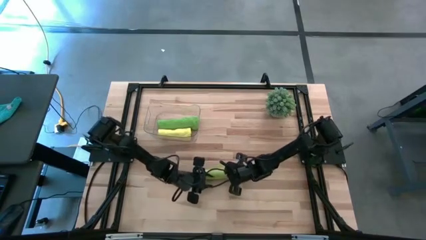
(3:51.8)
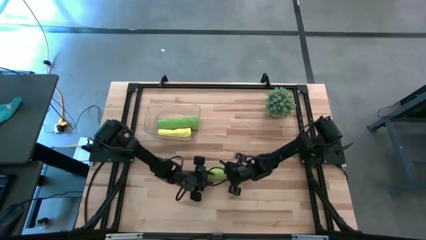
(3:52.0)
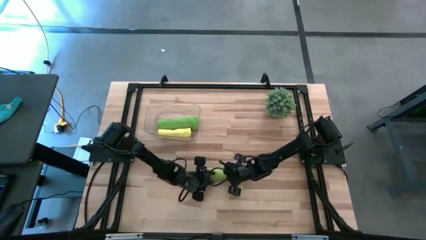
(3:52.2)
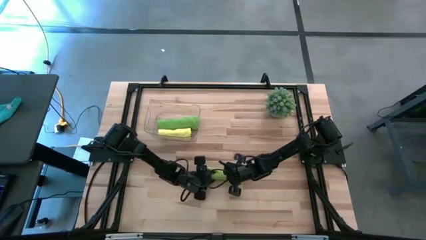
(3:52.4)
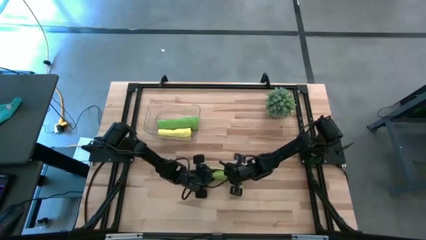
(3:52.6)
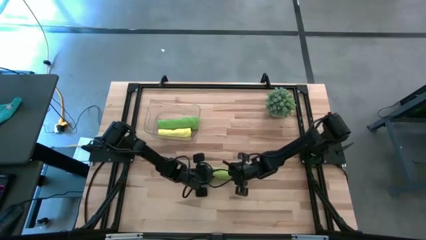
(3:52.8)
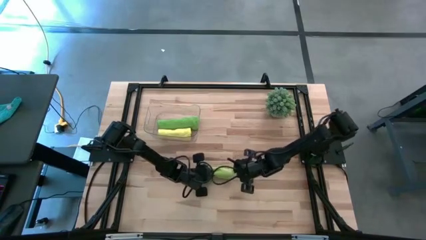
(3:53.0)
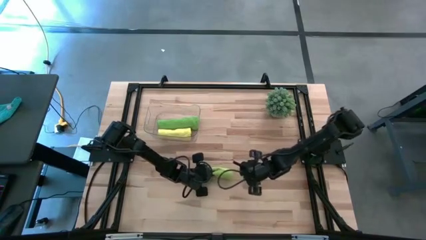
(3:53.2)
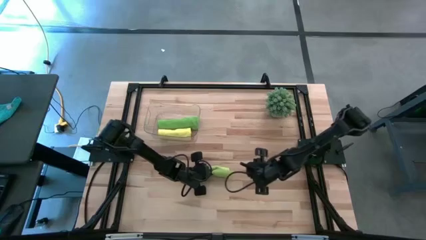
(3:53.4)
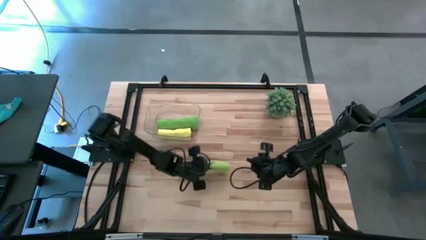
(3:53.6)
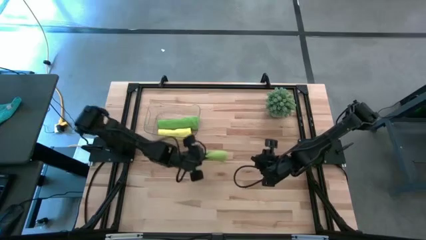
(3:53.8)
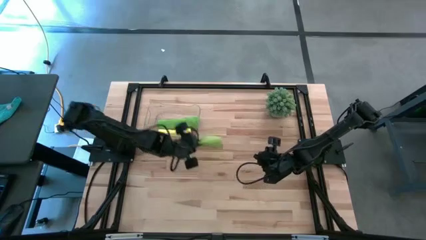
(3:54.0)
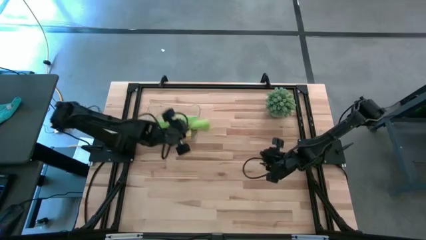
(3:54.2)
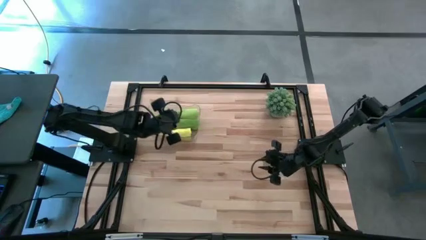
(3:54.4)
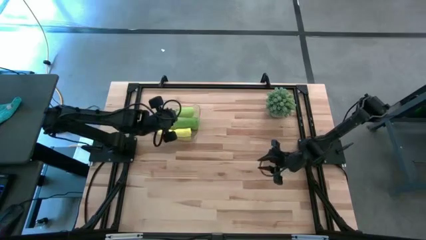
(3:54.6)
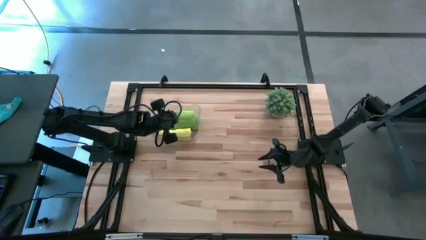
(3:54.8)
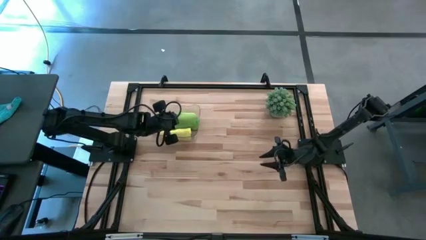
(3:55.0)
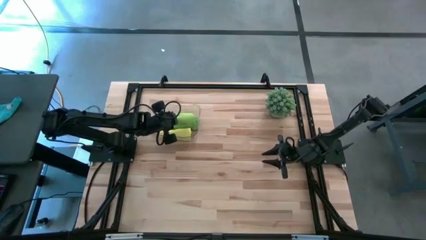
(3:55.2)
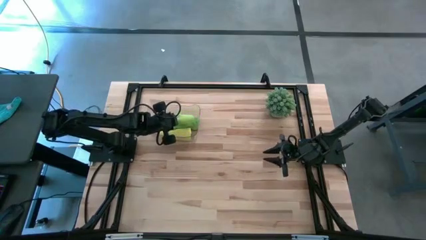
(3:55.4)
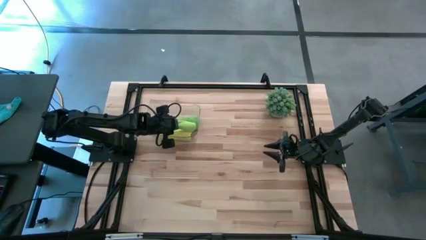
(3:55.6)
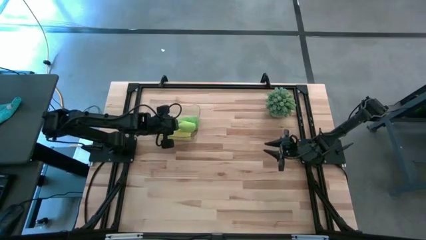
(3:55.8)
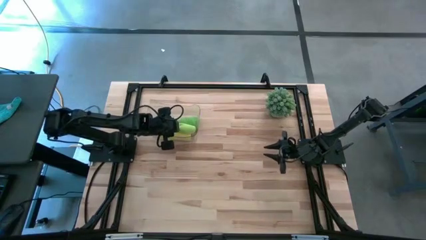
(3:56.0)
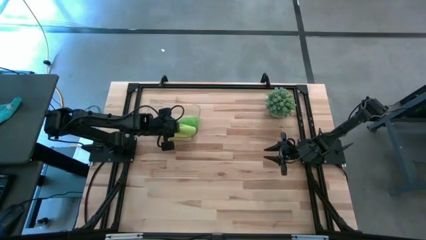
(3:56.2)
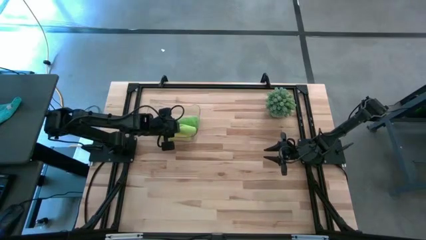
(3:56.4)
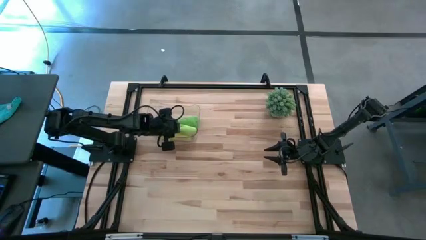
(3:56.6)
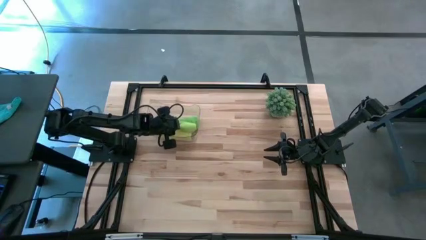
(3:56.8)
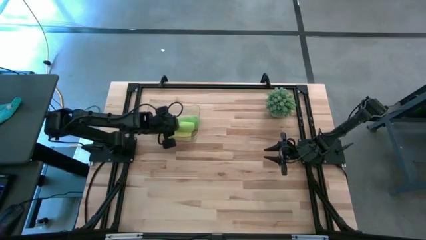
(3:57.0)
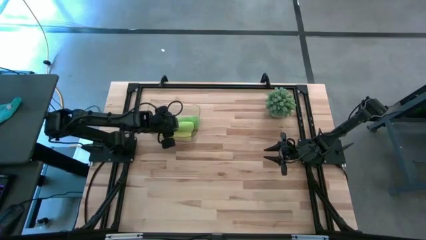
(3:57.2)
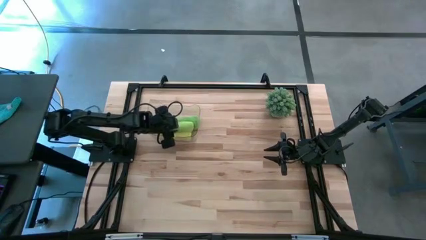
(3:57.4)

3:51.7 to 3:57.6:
Task: Roll microfiber towels into tight, uniform cylinder then place into a basket
Put the green towel into the transparent bin

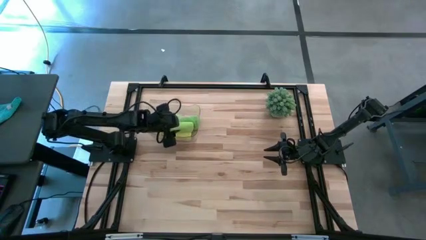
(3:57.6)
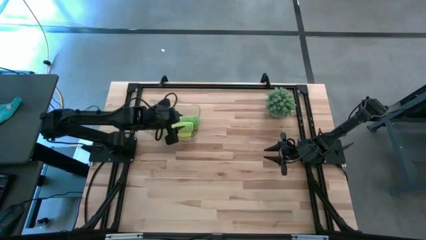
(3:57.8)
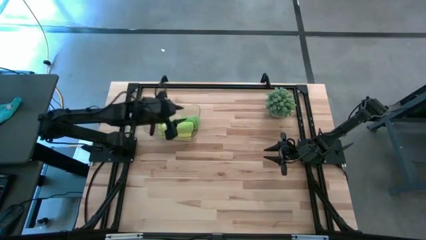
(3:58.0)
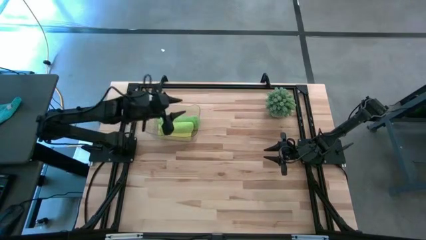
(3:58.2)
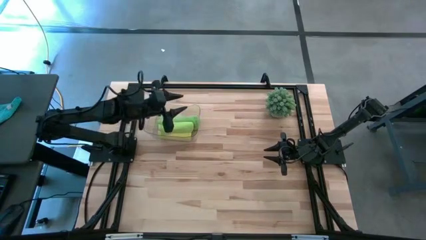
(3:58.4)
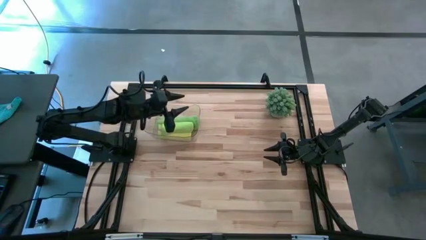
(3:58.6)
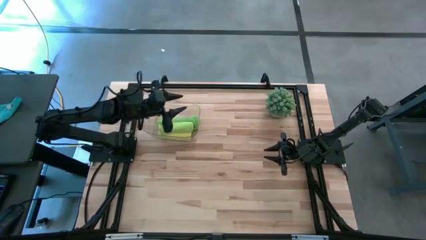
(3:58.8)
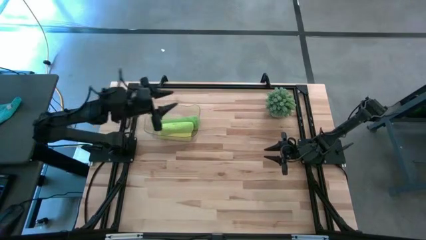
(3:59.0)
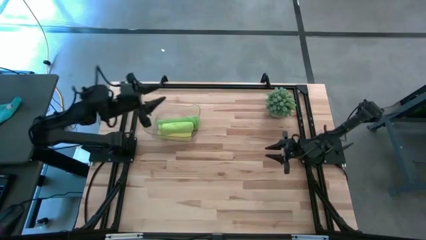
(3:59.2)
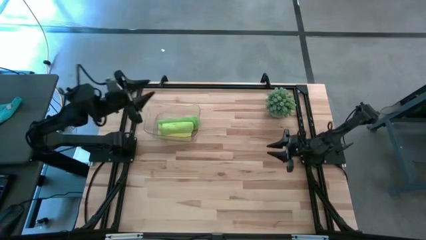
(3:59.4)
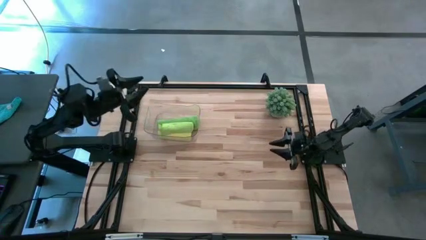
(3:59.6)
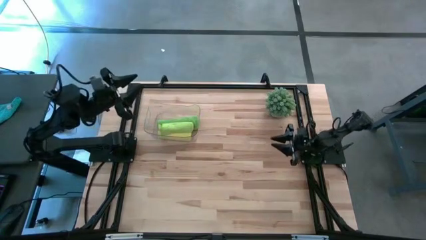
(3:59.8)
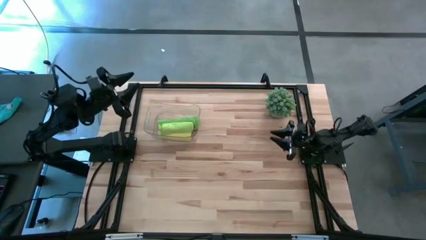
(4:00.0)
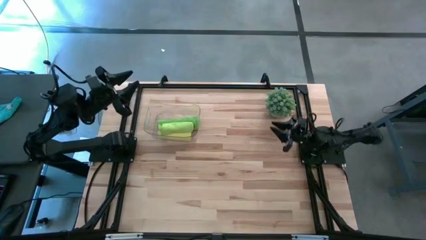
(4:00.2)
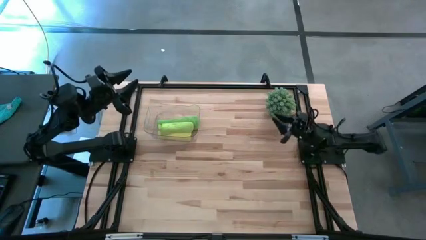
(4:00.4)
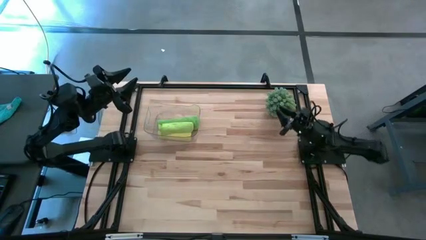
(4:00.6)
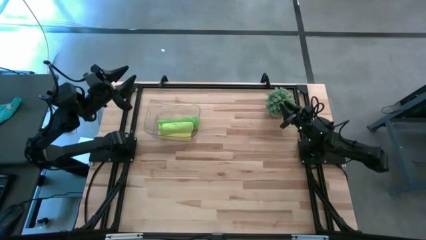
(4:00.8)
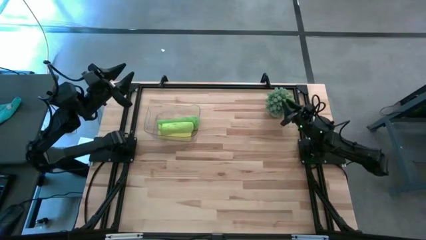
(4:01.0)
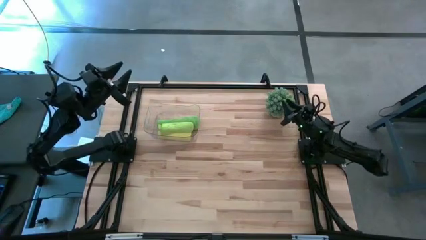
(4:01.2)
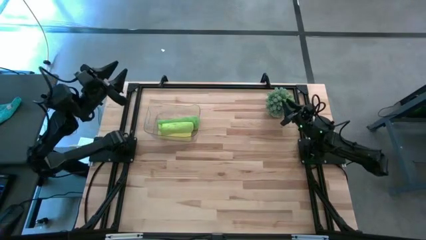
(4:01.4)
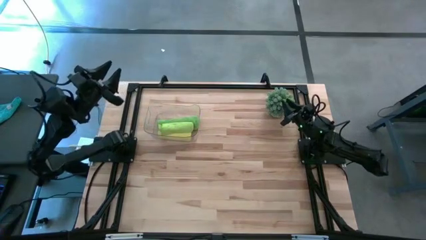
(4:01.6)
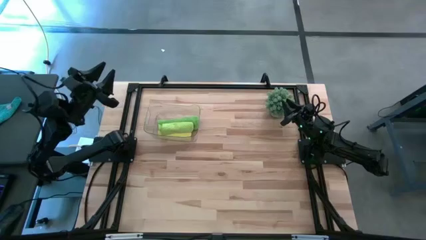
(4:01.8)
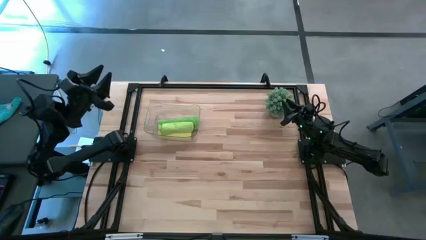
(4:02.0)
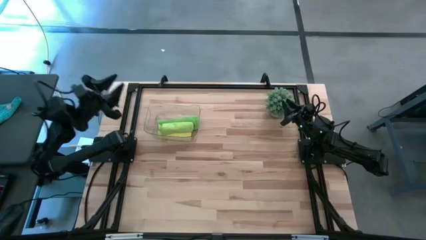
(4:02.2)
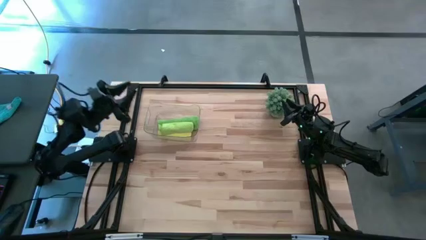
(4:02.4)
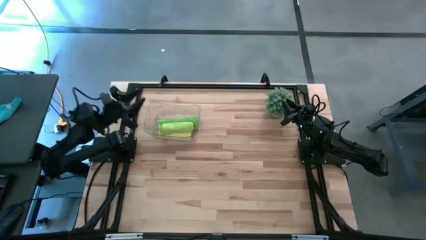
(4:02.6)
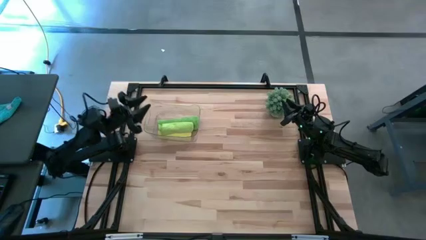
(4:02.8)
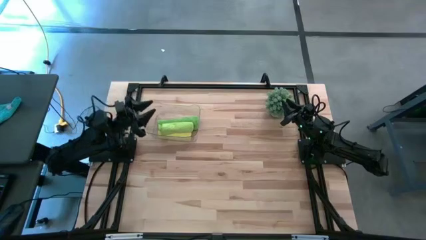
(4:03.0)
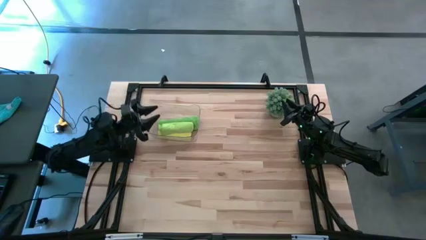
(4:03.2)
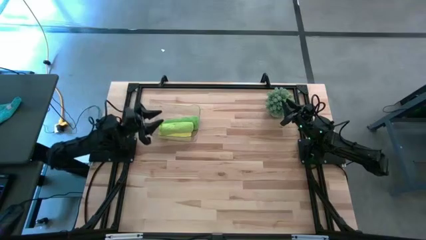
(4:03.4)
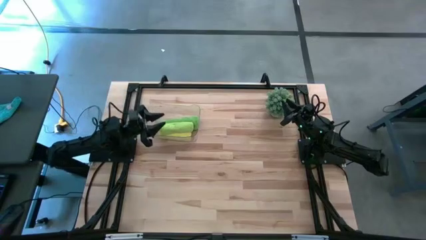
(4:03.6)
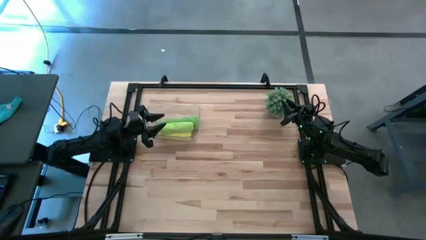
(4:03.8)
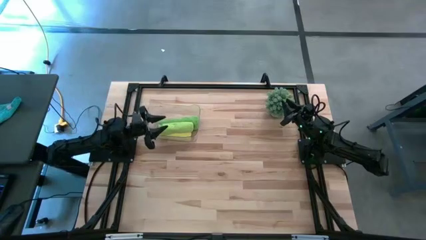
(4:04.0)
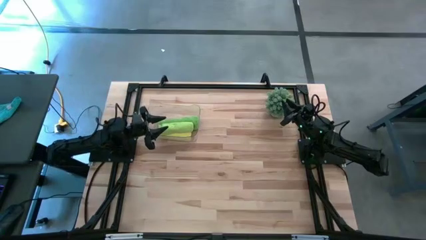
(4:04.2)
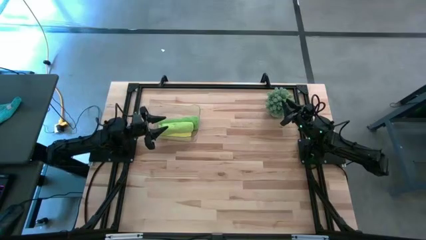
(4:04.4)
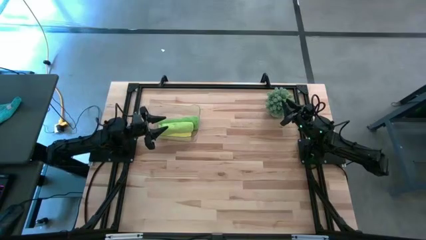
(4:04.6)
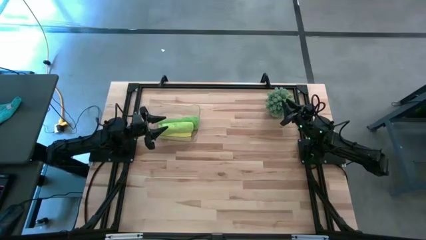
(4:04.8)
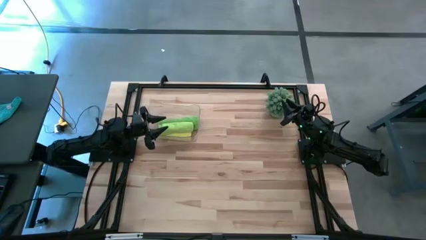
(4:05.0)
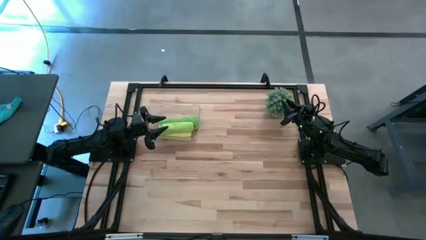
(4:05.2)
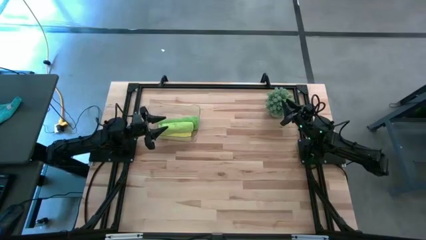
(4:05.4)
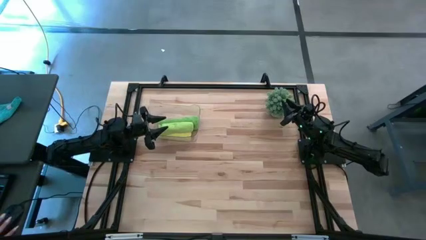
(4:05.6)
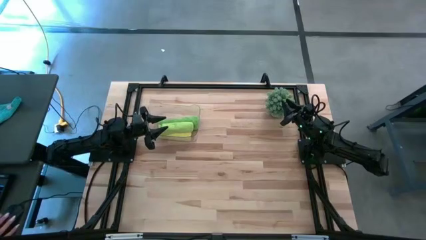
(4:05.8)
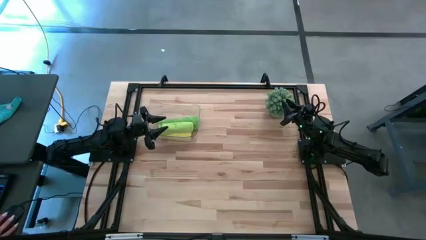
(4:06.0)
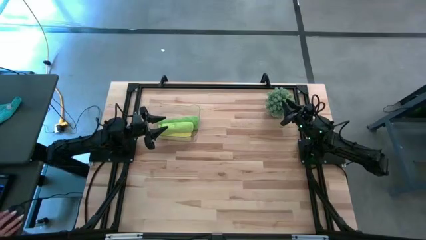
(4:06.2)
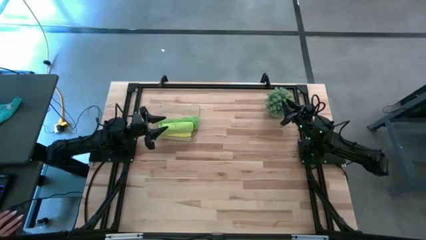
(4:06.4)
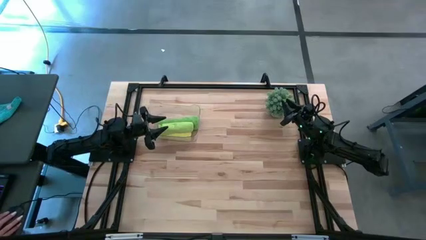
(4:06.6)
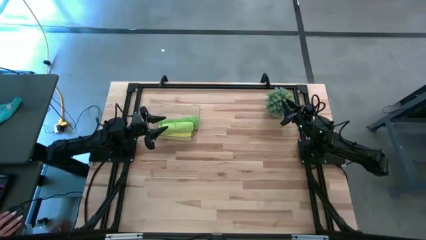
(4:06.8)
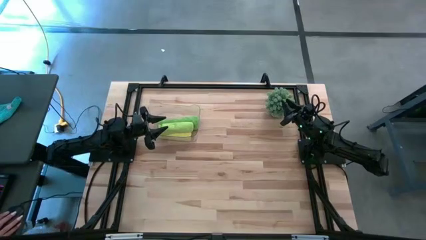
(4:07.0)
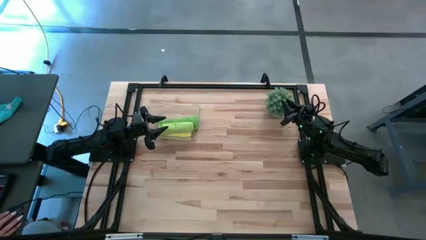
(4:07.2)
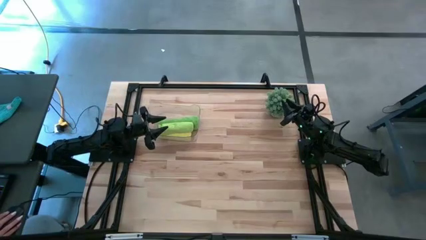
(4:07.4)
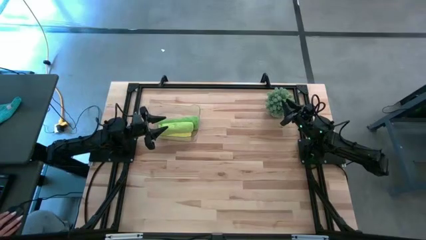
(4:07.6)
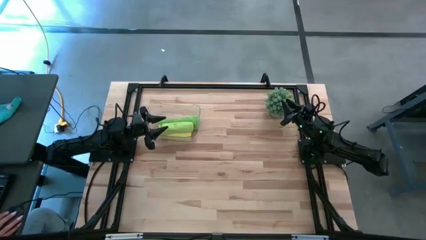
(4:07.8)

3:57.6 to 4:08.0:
Return to Home Position
